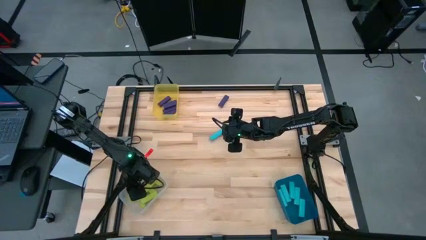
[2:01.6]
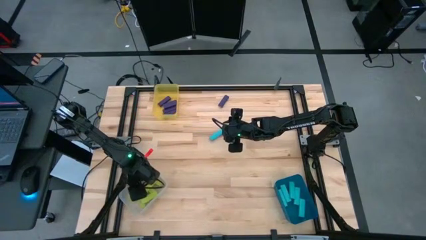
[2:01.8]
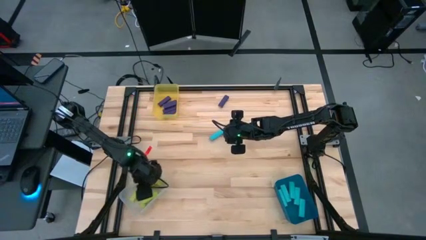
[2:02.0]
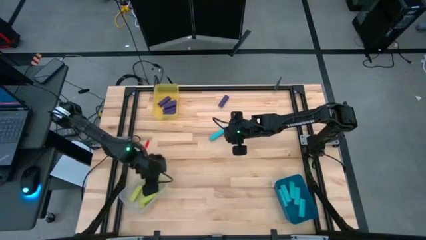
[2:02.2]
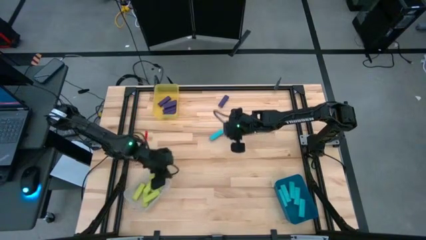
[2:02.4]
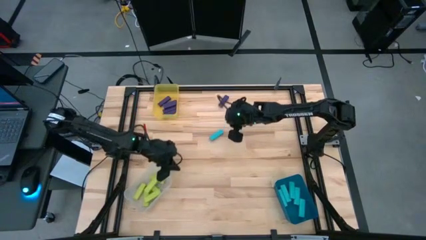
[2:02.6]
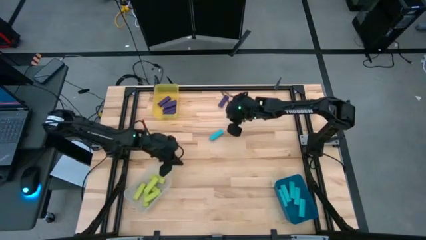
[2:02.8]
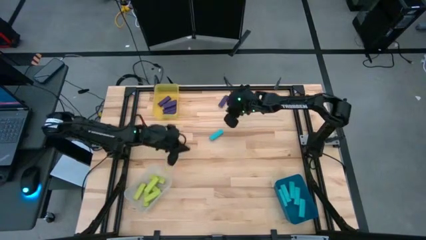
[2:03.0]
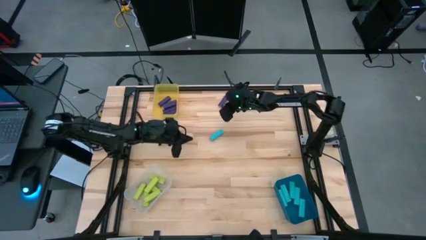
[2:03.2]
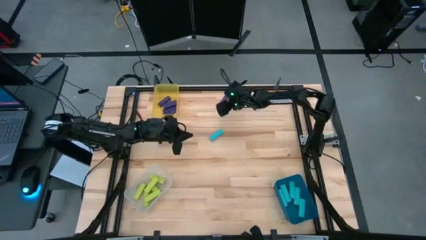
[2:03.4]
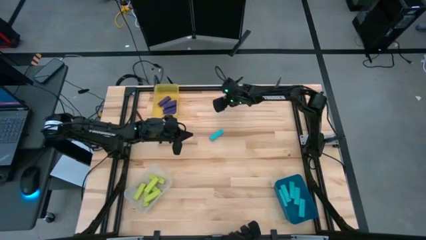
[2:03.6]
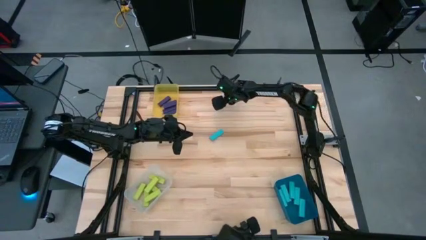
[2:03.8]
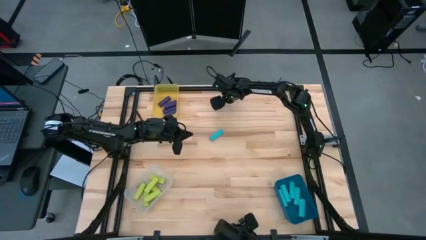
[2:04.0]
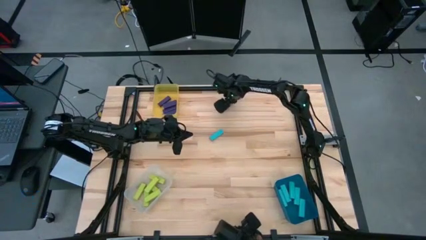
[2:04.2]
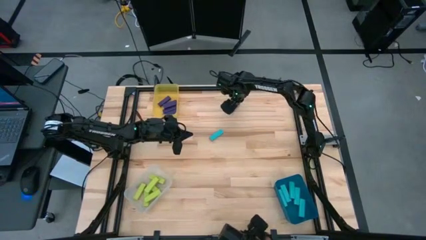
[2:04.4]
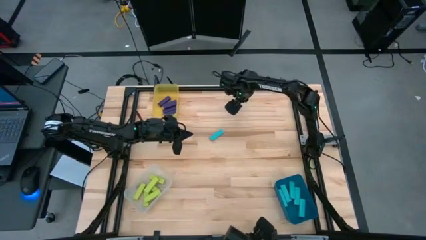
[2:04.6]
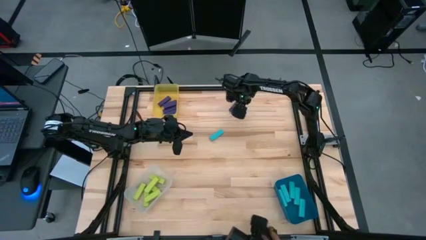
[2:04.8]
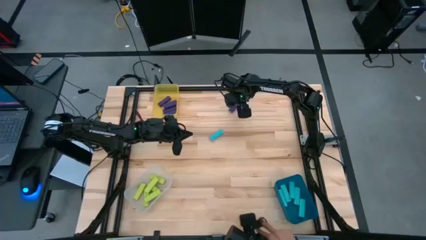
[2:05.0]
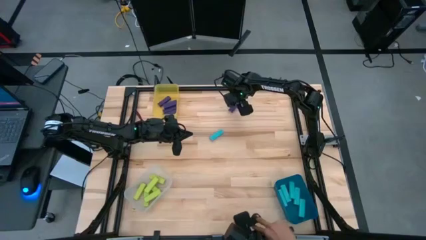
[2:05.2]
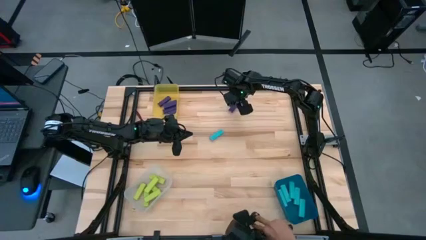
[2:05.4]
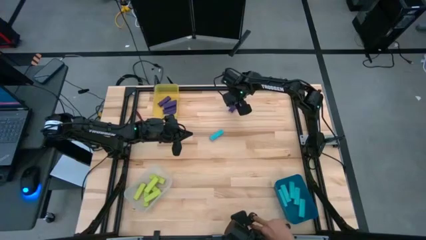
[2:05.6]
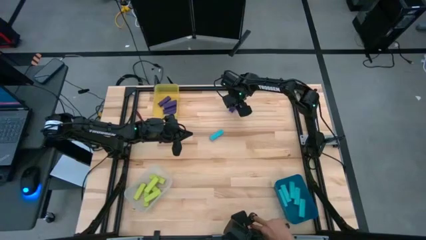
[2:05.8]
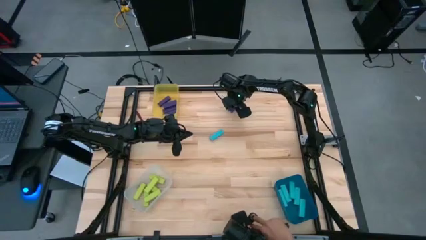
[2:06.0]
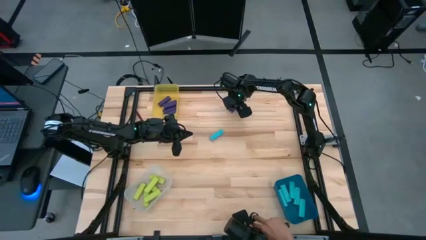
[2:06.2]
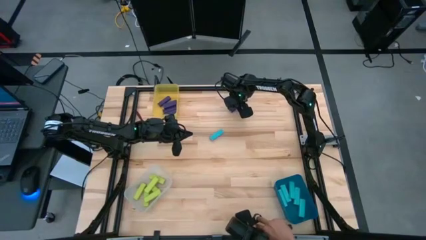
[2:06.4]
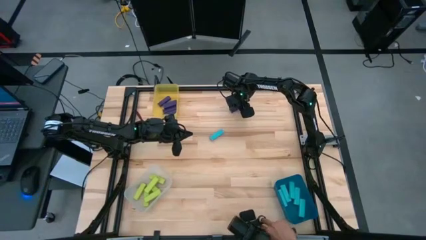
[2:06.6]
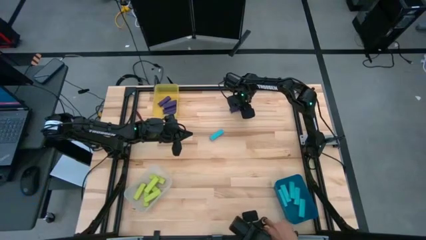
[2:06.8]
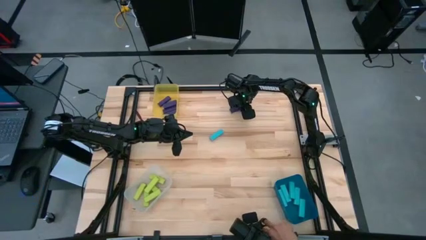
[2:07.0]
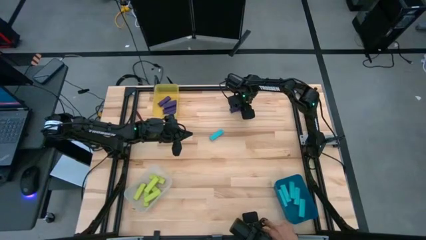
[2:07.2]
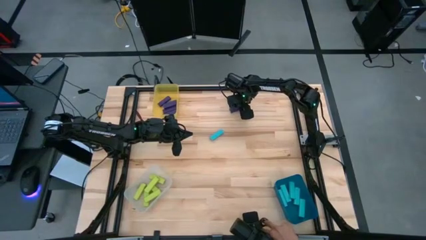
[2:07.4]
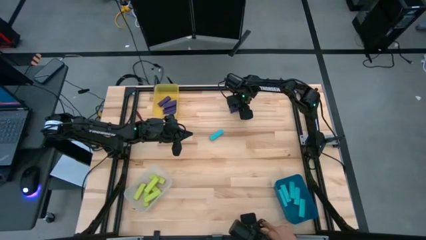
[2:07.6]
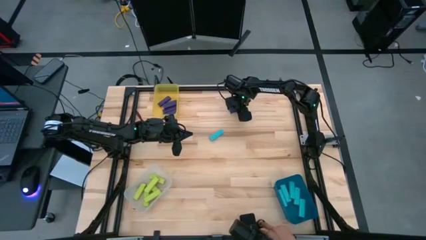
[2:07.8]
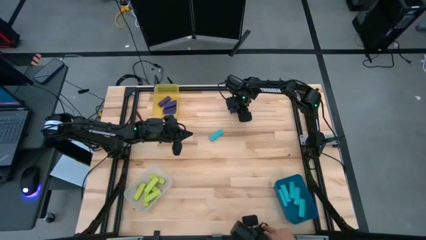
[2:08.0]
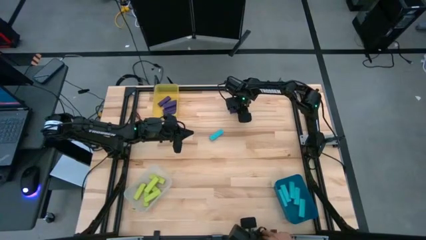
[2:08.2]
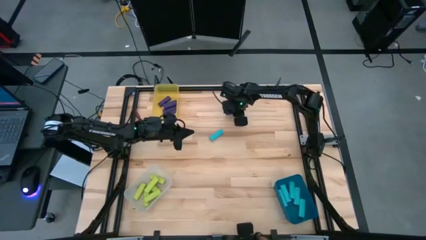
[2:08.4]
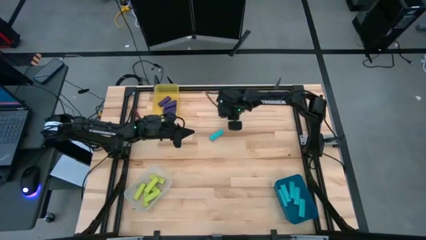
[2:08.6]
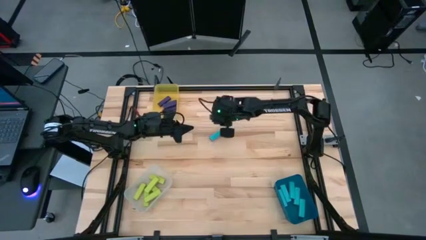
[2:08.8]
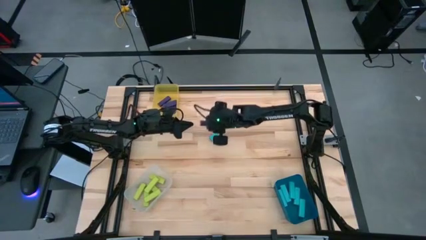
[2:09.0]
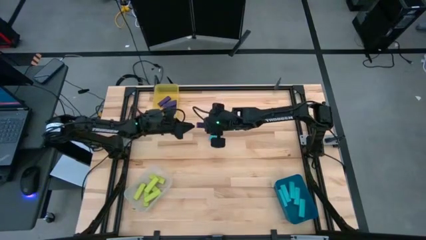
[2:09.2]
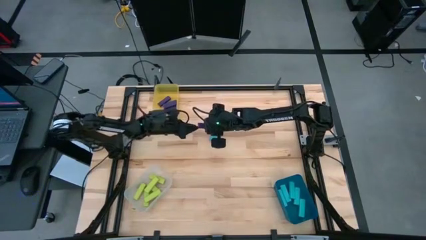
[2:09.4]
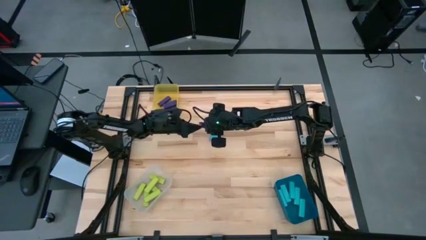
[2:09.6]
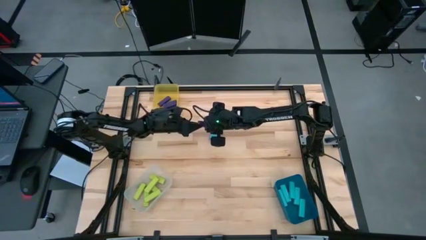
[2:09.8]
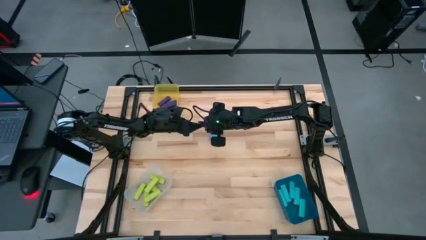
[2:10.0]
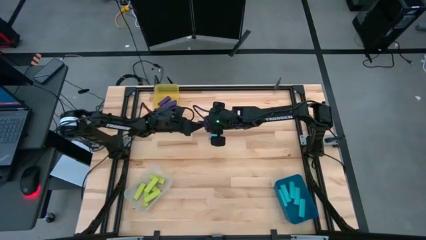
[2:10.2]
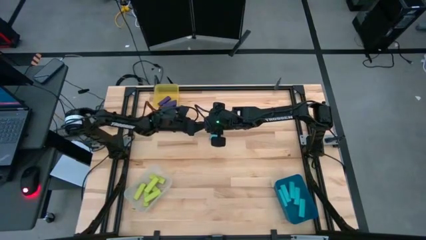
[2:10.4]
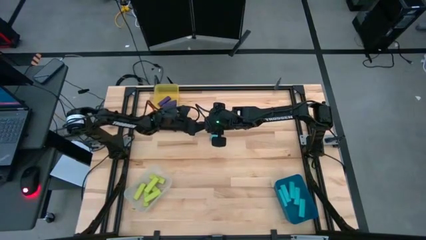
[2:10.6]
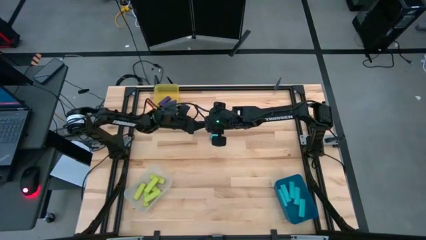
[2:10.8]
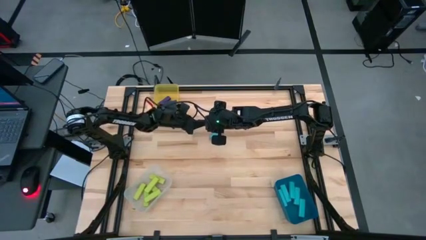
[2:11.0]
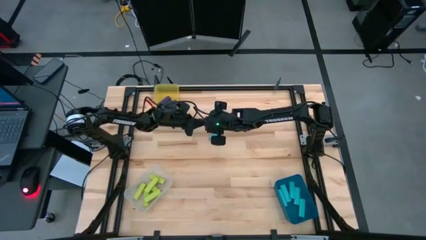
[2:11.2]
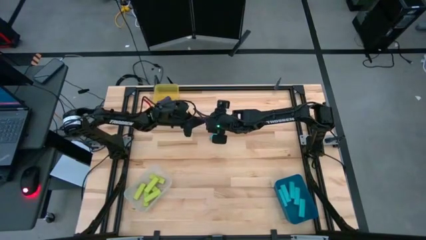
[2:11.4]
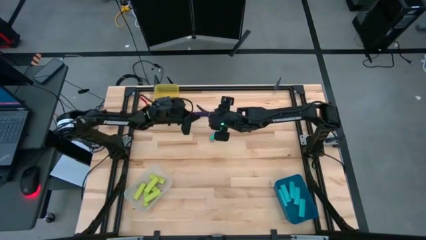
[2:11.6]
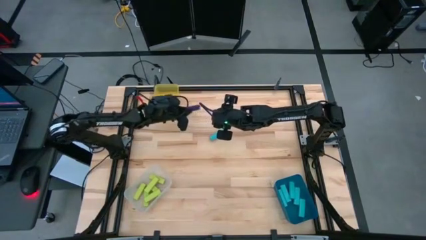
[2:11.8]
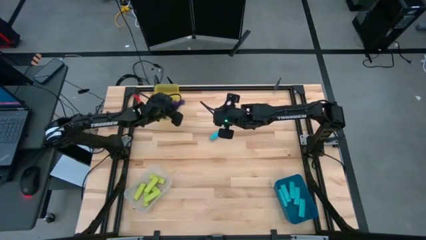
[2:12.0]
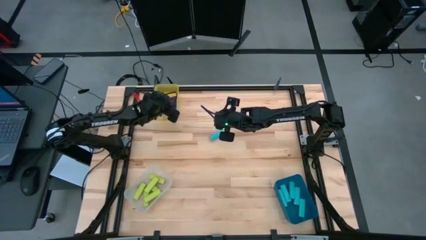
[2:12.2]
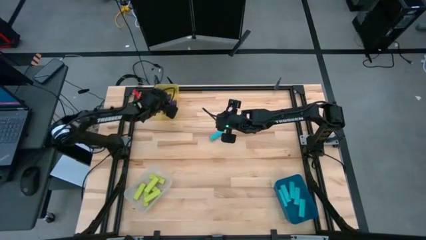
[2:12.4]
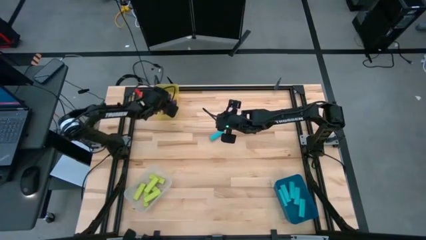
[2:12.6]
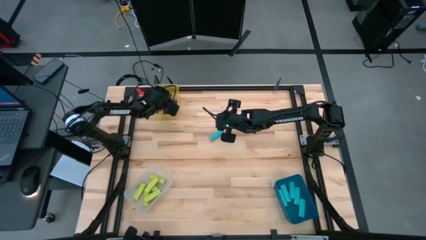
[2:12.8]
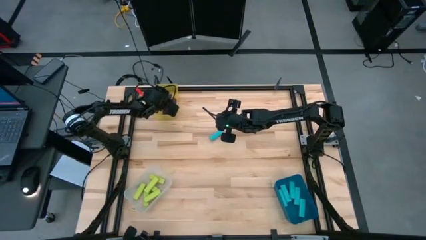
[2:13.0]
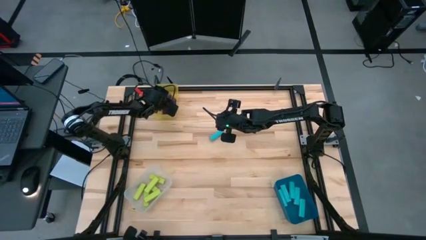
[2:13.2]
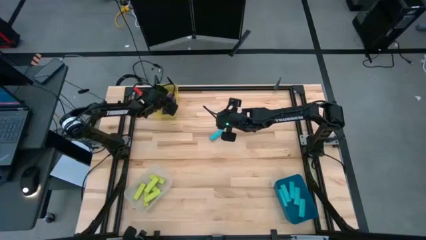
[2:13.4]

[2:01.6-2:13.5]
Task: Sort blocks
Put the violet block into the yellow bin

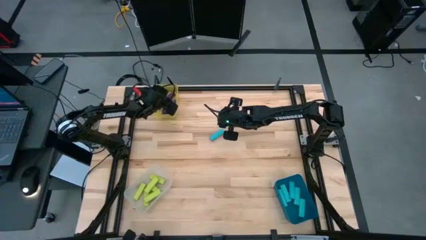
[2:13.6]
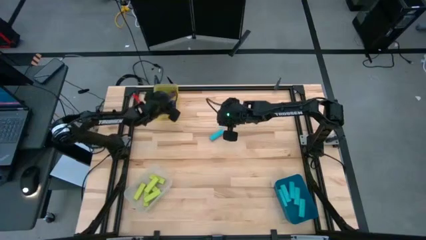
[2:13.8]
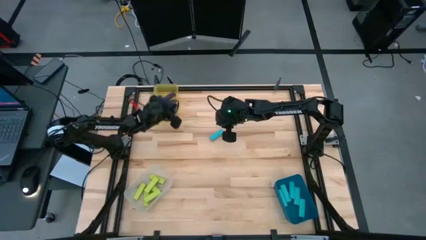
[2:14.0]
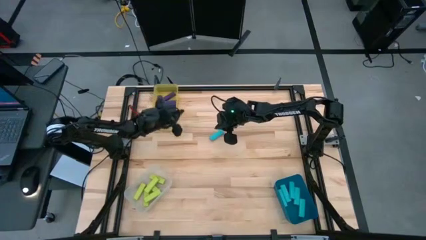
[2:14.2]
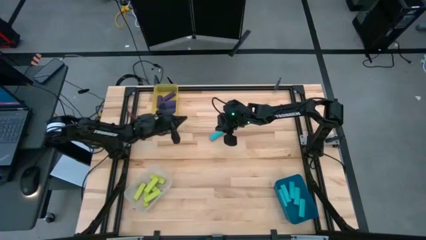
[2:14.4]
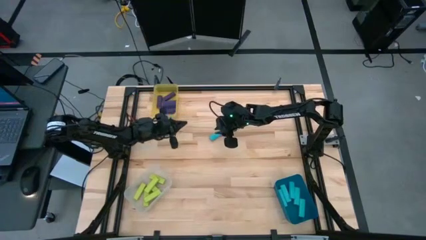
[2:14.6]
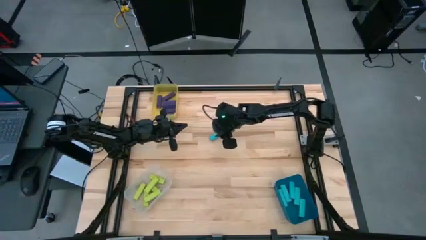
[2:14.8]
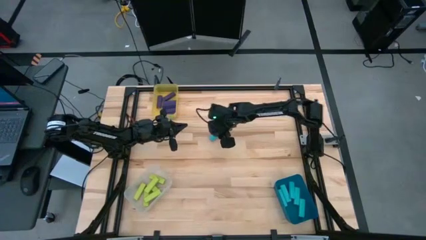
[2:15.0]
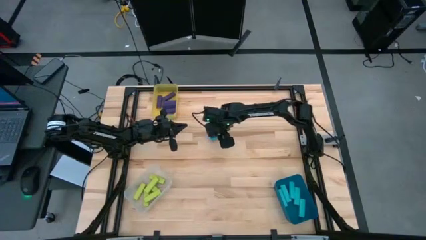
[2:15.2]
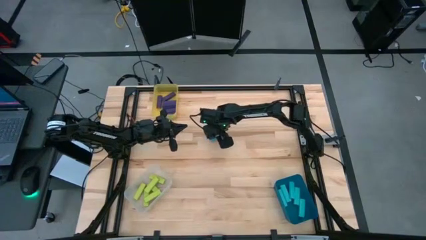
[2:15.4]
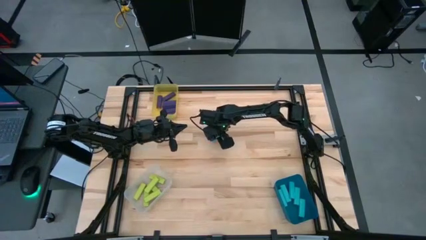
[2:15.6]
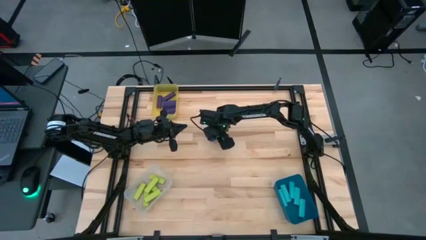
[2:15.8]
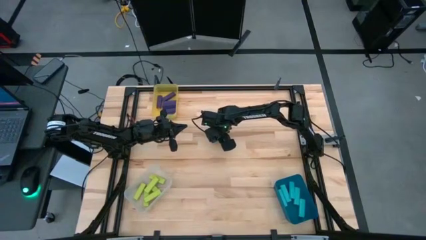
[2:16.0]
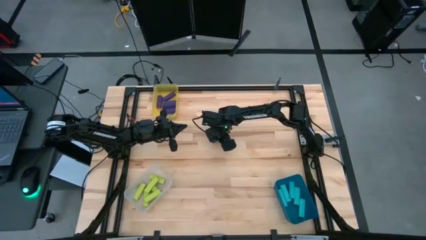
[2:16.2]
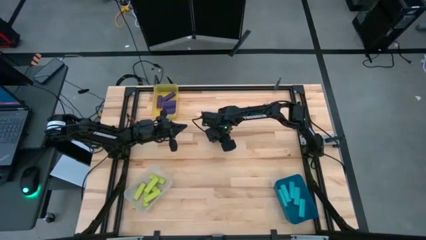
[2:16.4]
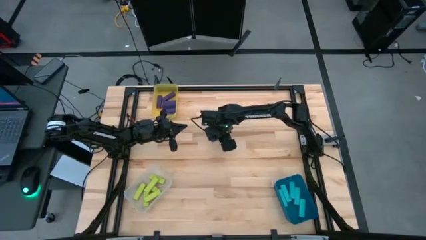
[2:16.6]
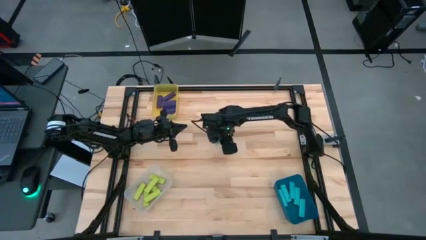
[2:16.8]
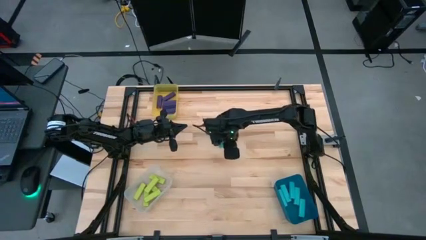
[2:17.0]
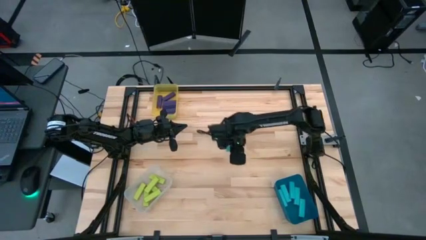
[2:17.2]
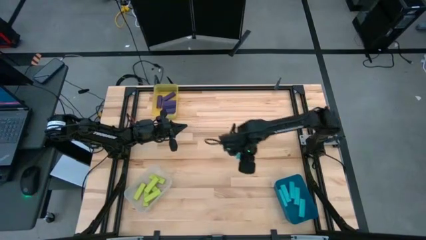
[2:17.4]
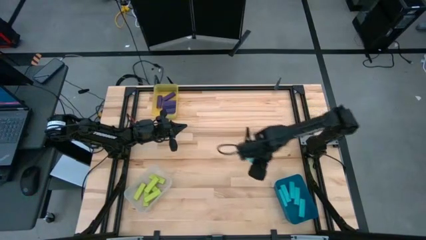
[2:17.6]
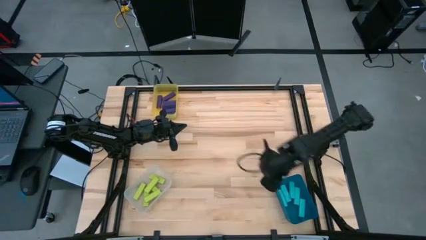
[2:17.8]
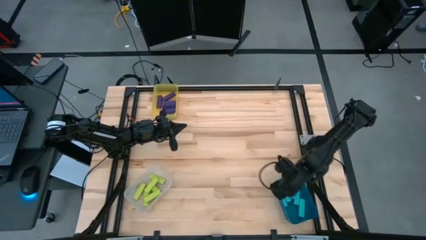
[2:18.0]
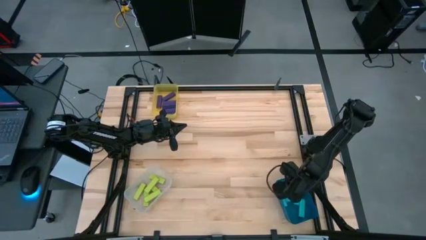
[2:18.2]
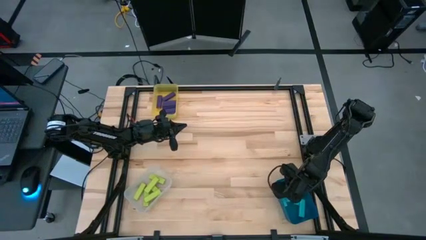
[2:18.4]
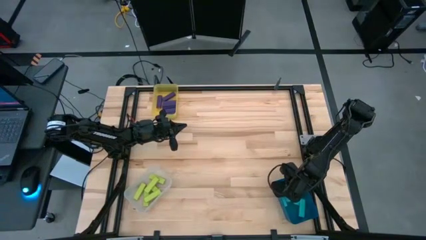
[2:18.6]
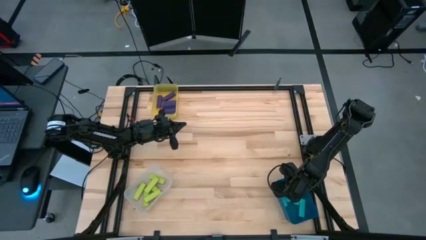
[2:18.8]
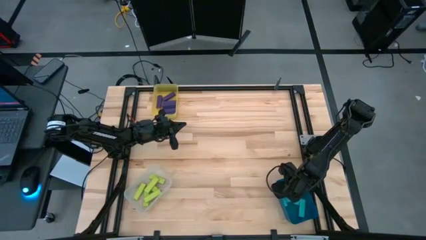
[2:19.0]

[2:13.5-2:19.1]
Put the blue block into the blue bin
